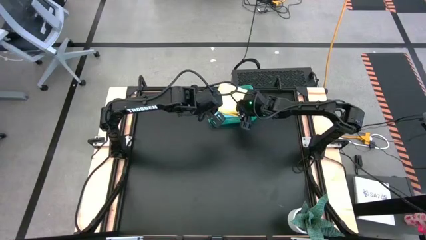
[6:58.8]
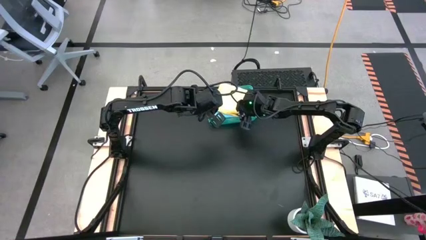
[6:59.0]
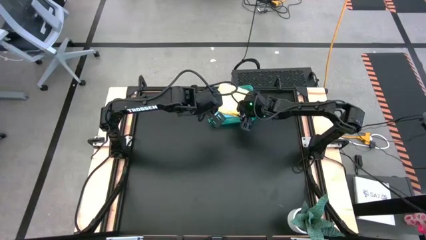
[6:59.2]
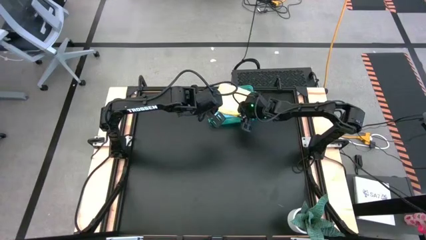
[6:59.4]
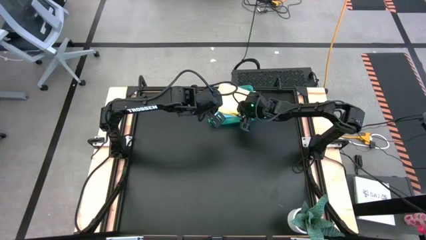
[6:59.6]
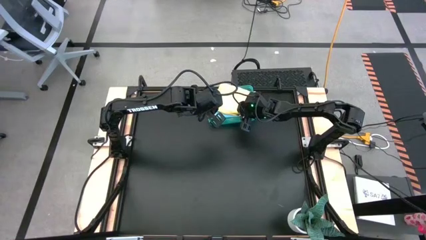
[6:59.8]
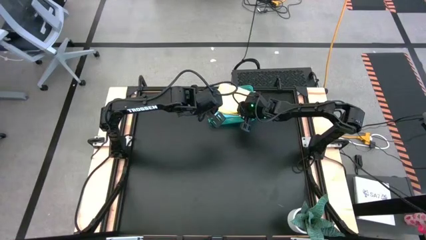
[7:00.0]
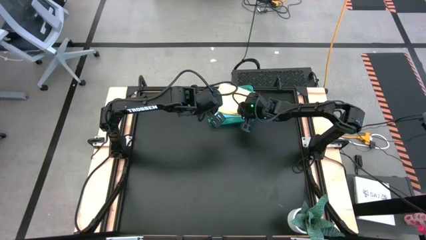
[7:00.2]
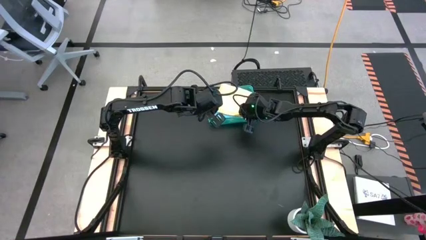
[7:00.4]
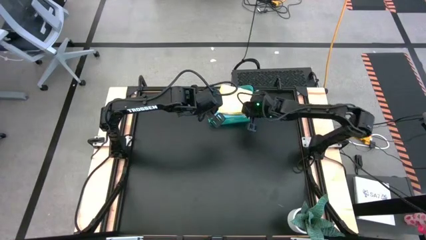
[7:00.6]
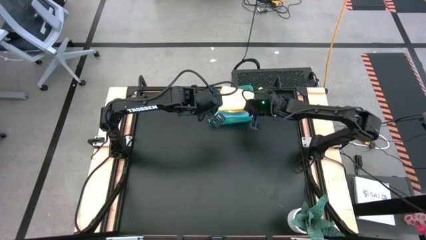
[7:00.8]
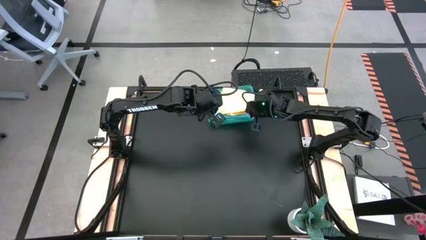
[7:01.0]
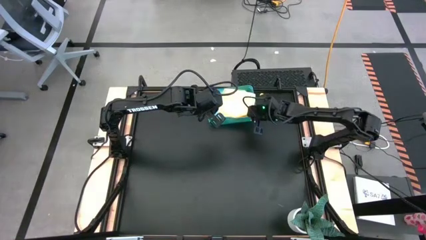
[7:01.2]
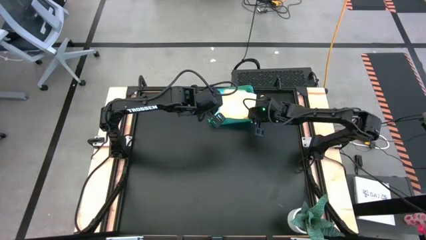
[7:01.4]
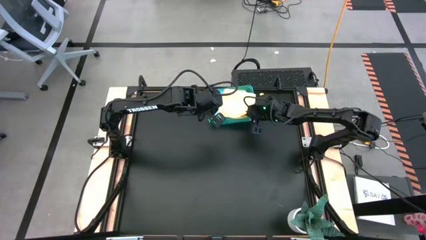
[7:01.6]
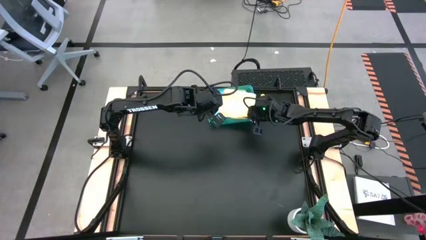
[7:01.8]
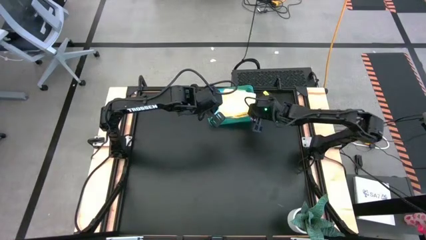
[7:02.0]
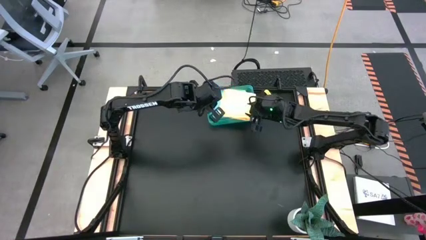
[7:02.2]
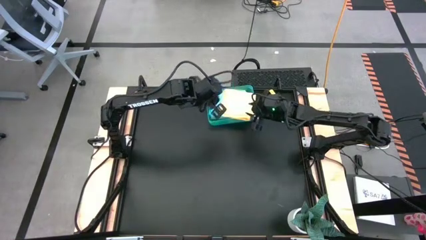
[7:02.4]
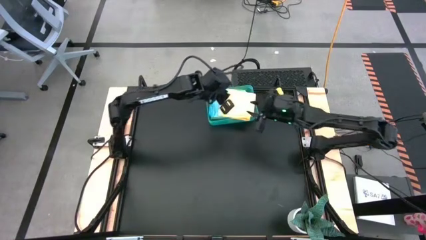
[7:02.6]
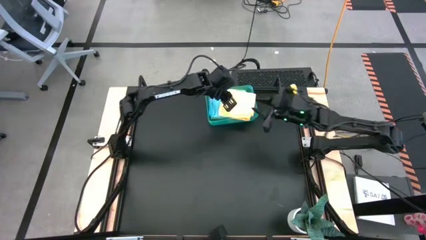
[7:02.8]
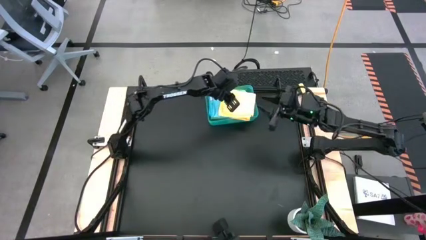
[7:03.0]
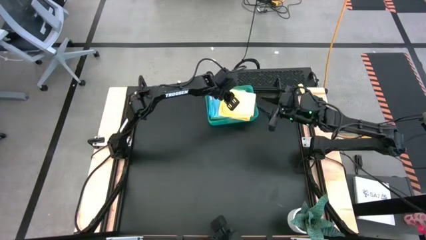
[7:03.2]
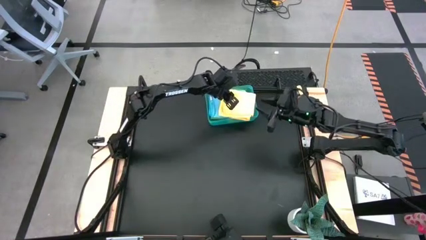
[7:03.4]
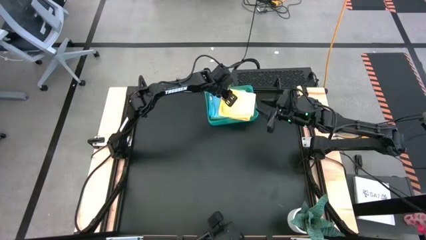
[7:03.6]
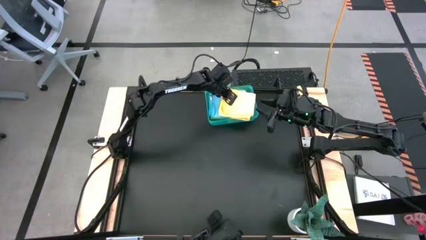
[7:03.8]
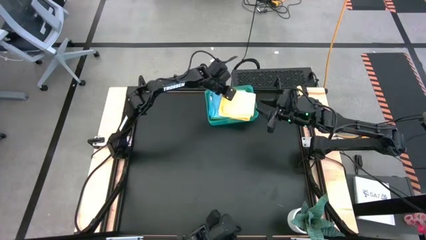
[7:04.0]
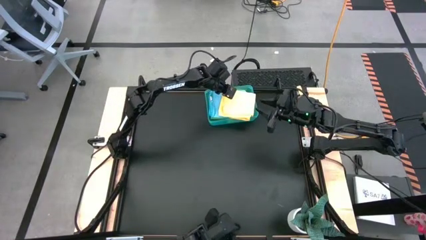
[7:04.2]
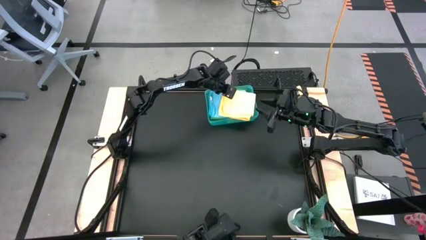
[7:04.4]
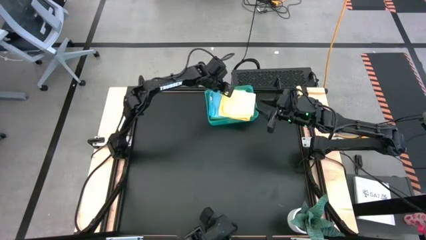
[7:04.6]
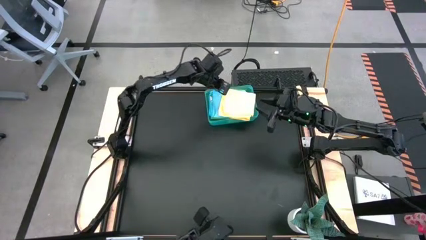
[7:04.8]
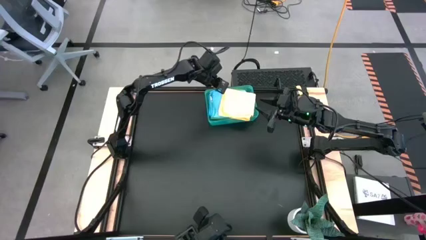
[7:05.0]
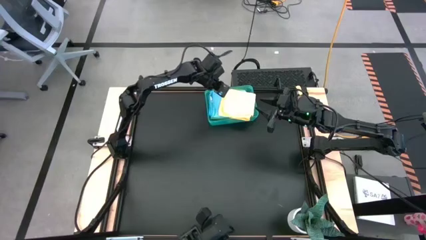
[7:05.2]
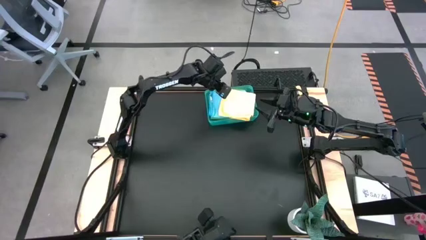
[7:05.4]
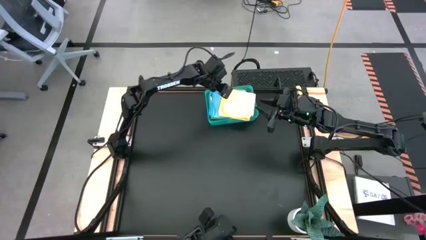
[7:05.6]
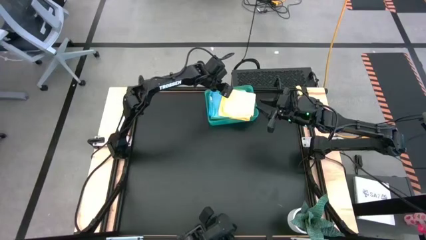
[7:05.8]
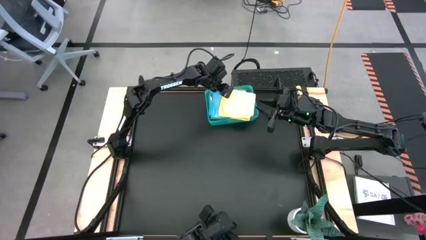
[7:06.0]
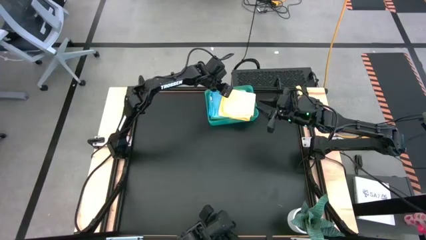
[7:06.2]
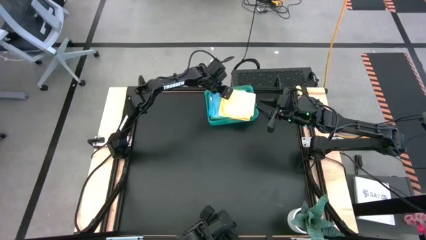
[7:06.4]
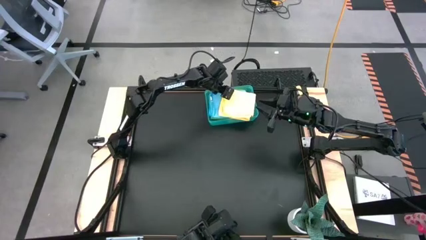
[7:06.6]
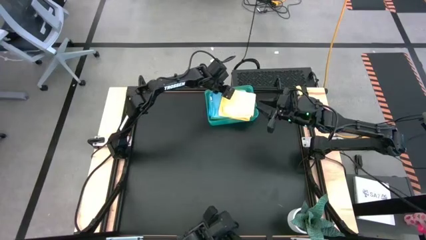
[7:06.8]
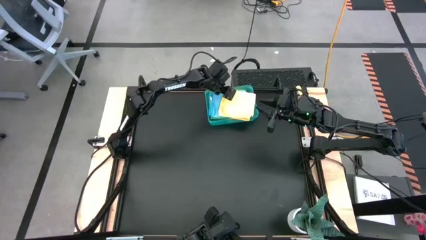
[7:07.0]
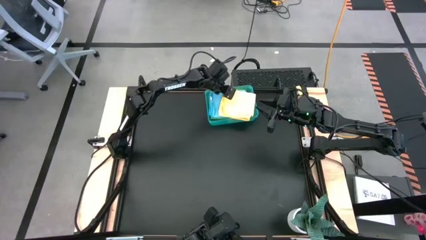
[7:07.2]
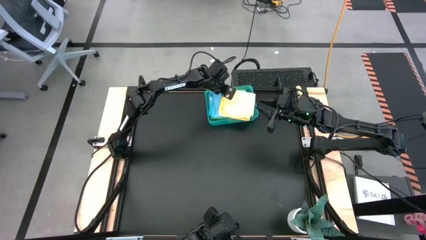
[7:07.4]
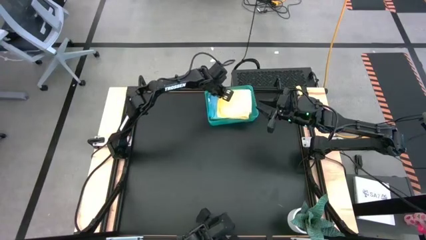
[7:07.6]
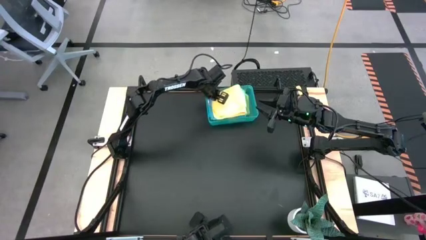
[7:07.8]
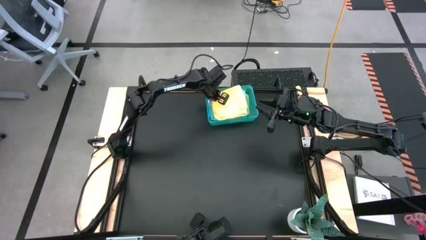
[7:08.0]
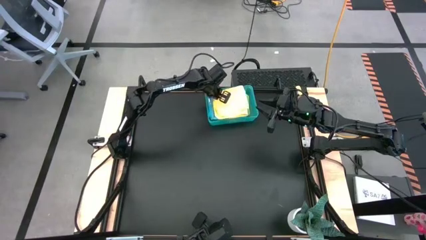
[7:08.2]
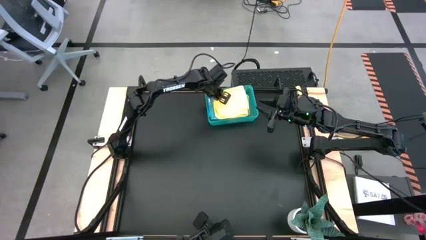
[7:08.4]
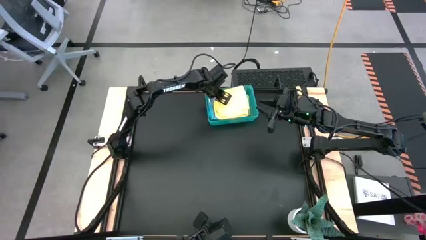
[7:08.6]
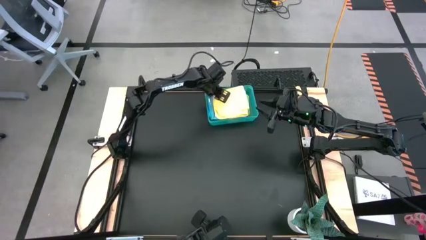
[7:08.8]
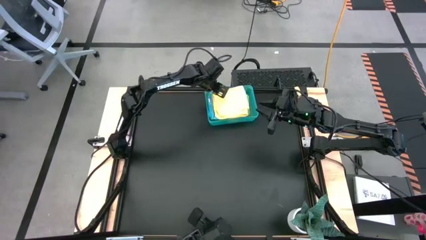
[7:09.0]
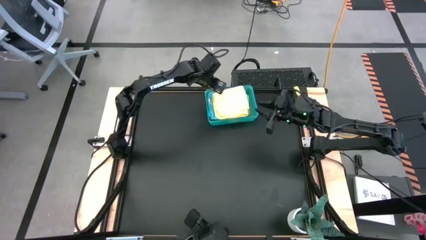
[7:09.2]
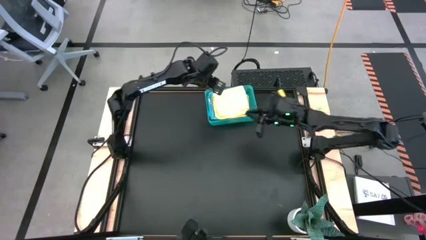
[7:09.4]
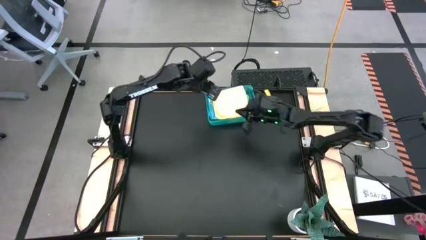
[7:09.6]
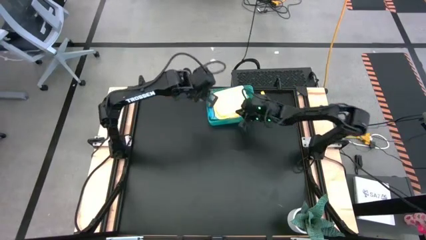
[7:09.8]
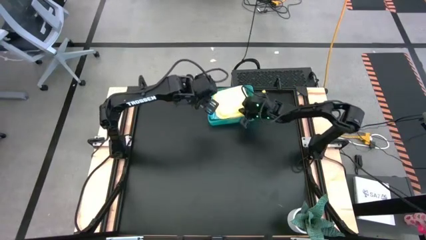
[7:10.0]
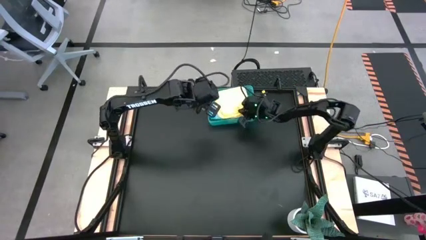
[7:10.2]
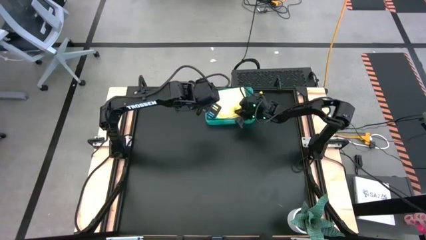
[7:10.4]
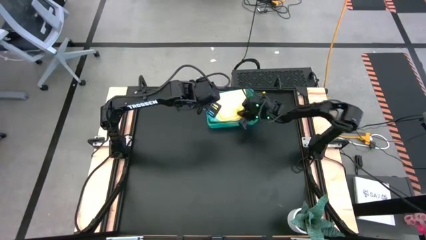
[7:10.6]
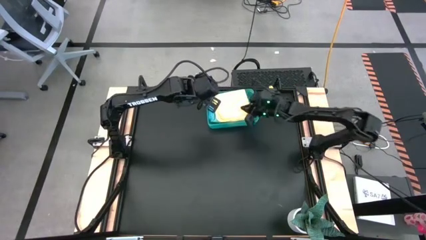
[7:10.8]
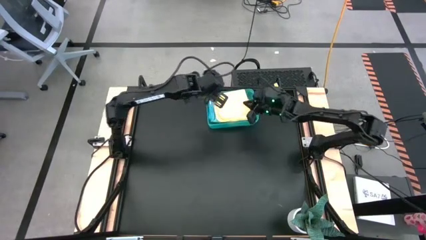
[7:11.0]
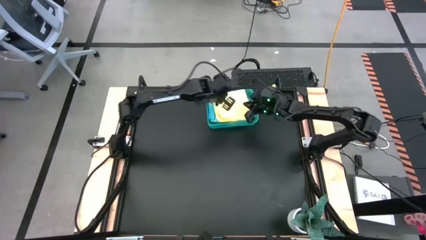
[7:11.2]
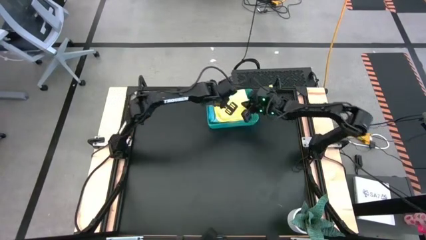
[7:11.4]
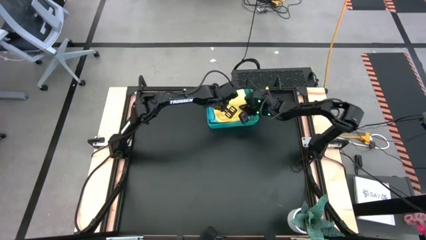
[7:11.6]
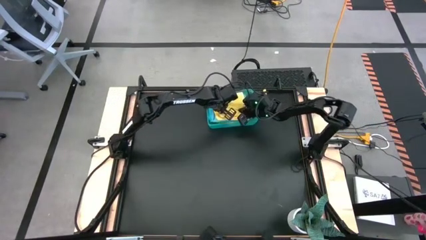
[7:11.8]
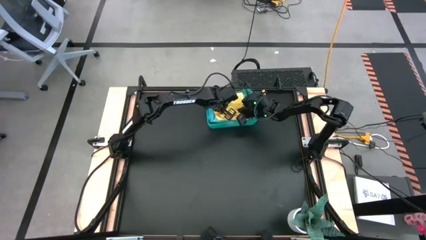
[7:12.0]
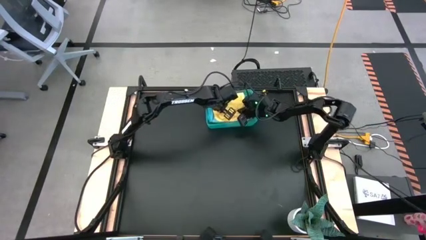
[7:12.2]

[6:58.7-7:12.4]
Task: Fold microfiber towels
Put the yellow microfiber towel into the blue bin
